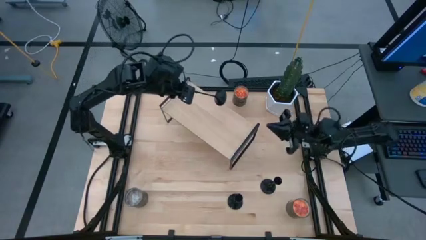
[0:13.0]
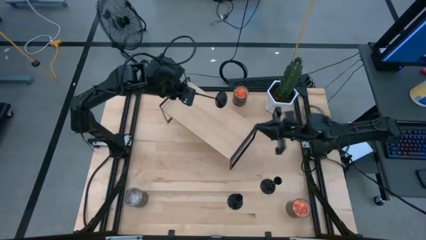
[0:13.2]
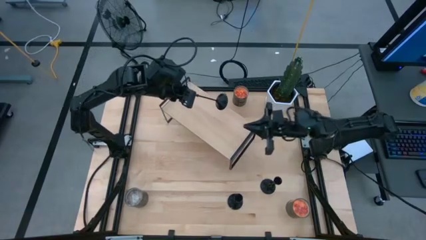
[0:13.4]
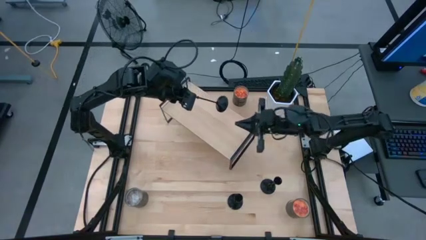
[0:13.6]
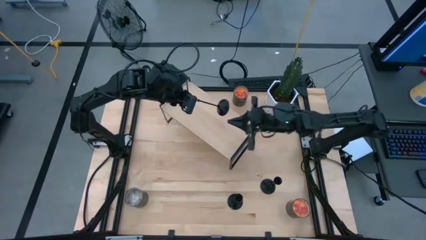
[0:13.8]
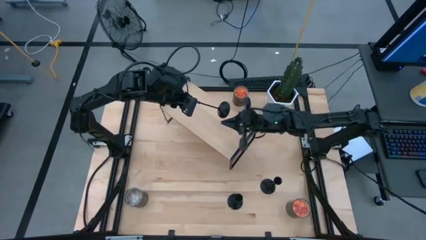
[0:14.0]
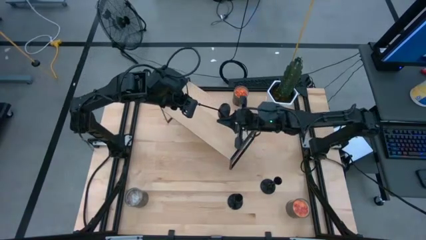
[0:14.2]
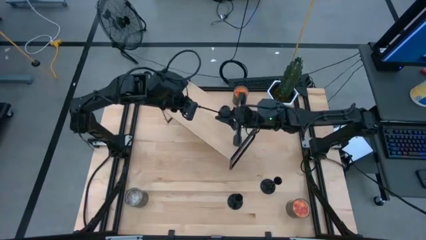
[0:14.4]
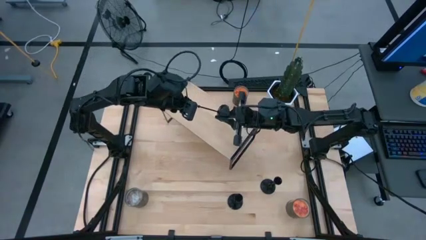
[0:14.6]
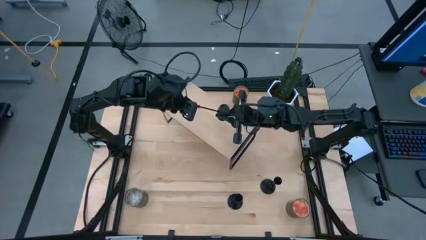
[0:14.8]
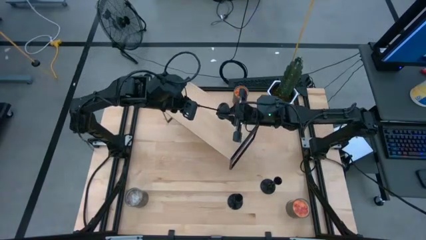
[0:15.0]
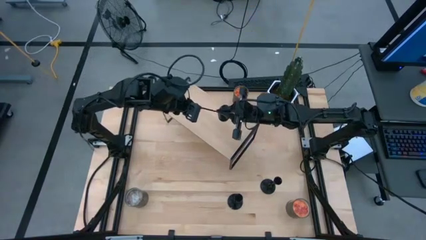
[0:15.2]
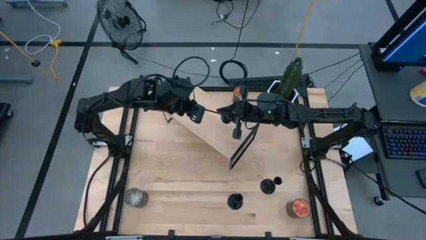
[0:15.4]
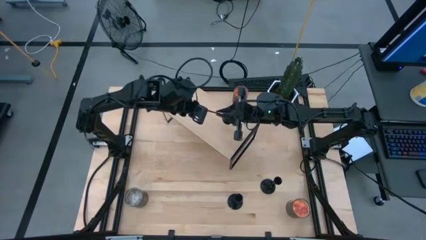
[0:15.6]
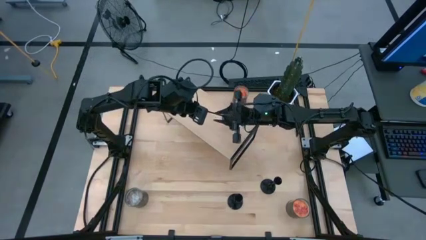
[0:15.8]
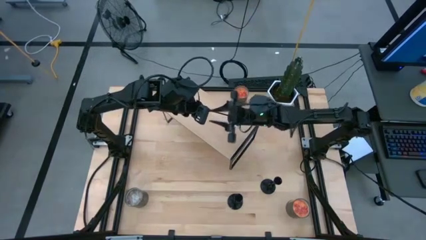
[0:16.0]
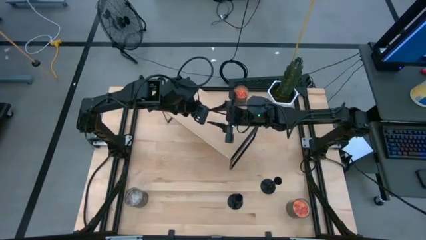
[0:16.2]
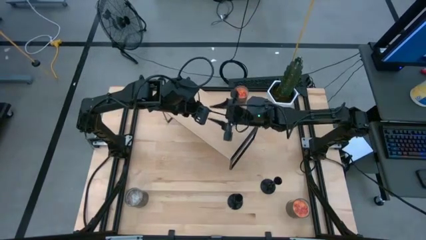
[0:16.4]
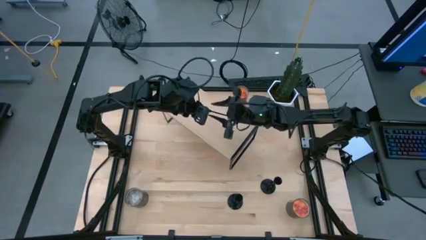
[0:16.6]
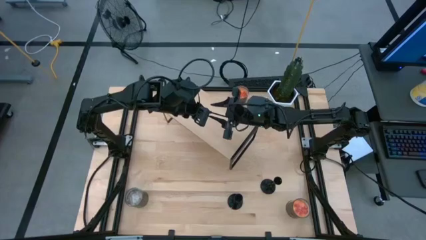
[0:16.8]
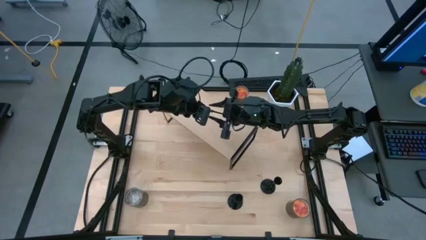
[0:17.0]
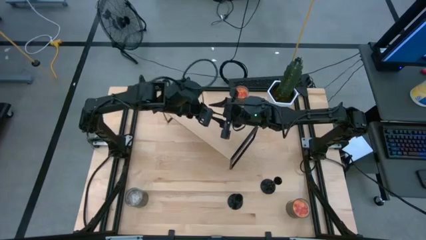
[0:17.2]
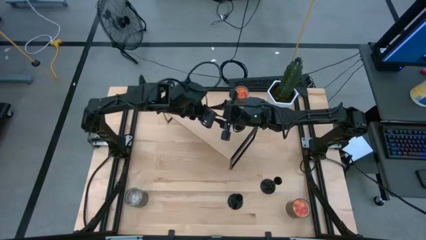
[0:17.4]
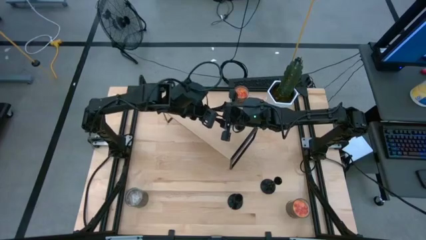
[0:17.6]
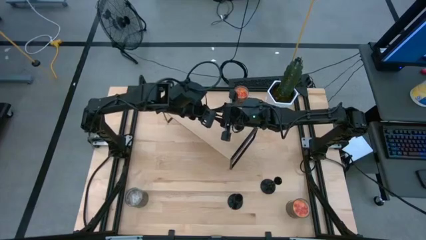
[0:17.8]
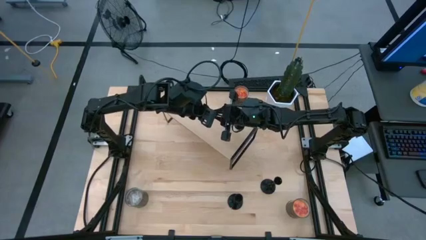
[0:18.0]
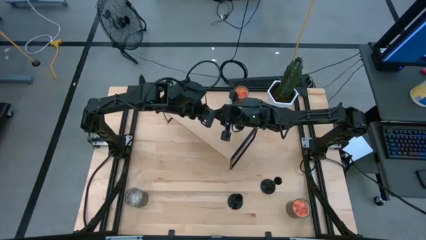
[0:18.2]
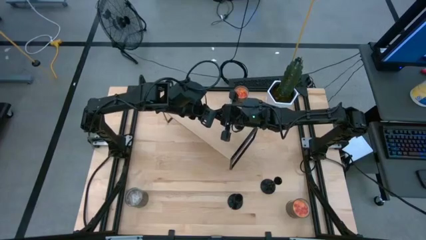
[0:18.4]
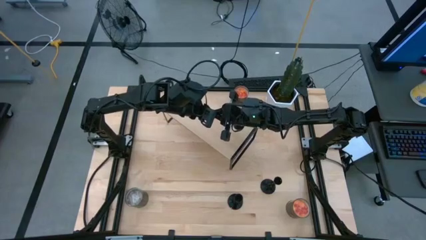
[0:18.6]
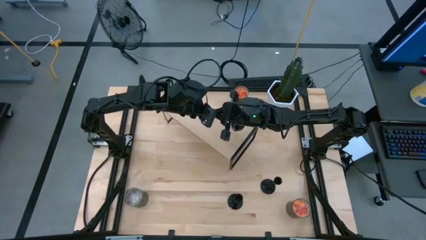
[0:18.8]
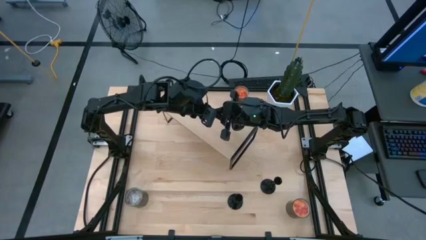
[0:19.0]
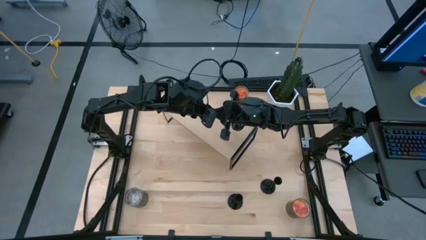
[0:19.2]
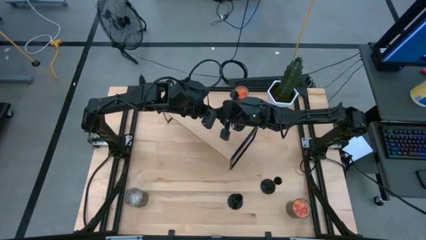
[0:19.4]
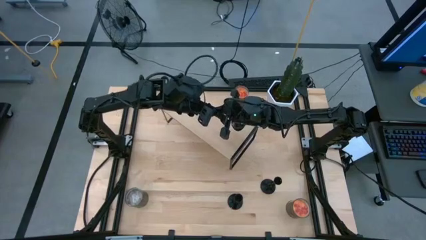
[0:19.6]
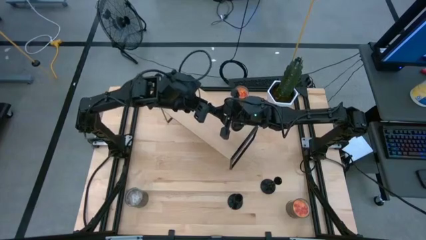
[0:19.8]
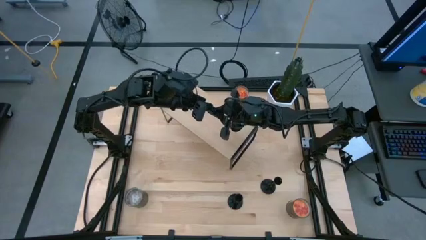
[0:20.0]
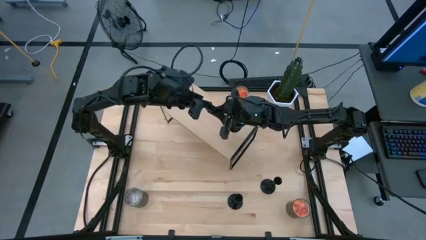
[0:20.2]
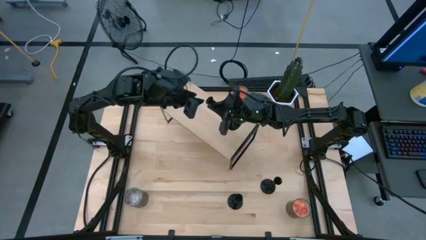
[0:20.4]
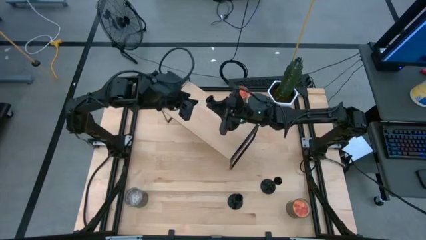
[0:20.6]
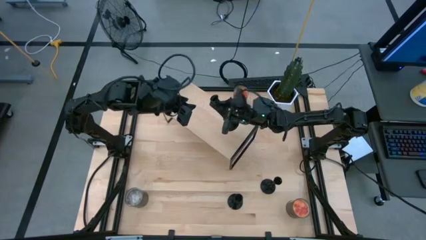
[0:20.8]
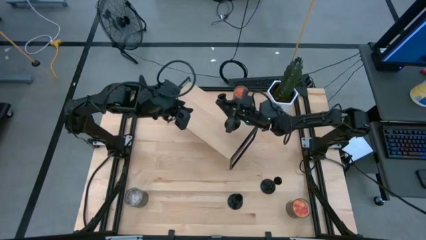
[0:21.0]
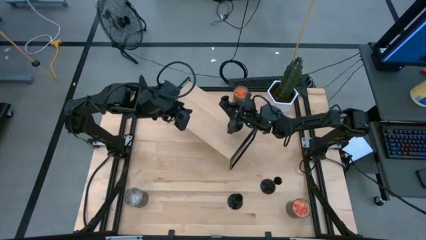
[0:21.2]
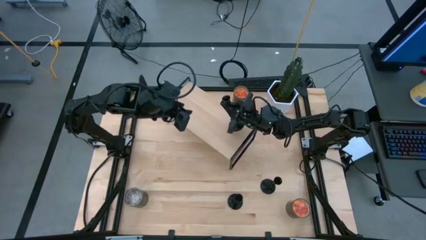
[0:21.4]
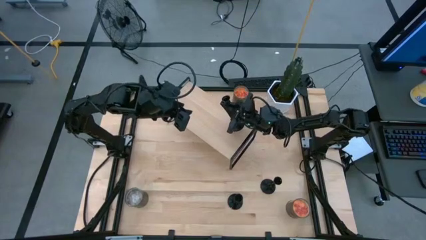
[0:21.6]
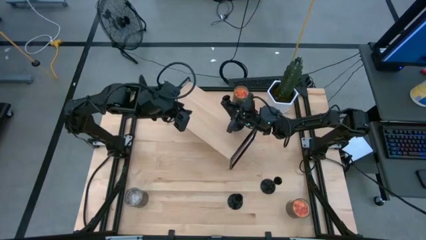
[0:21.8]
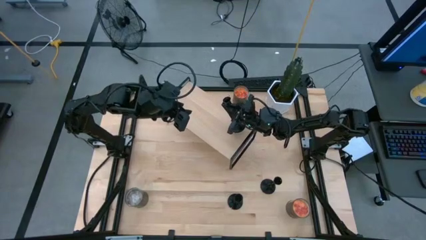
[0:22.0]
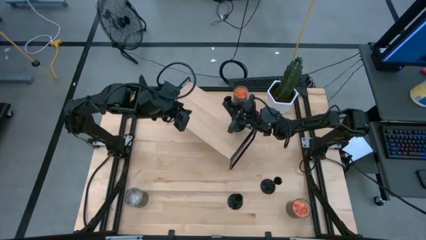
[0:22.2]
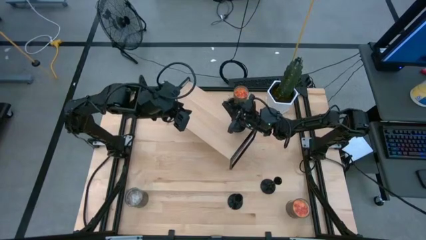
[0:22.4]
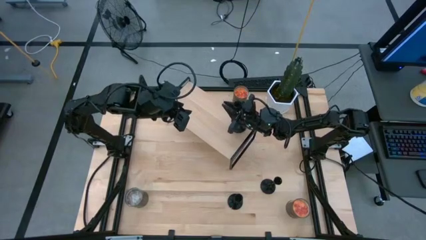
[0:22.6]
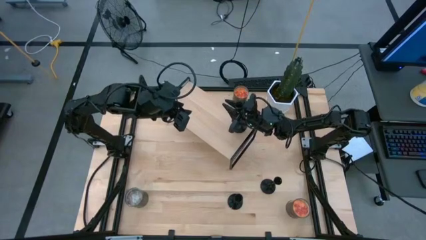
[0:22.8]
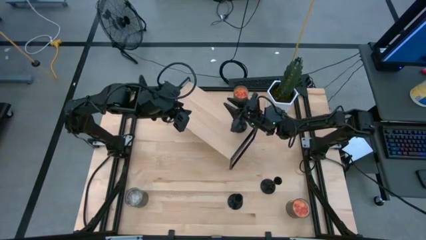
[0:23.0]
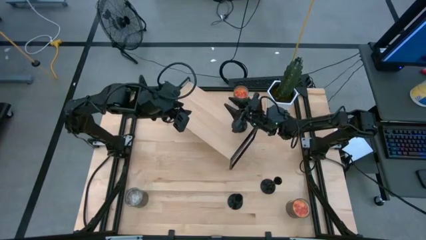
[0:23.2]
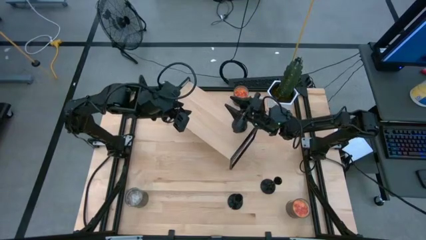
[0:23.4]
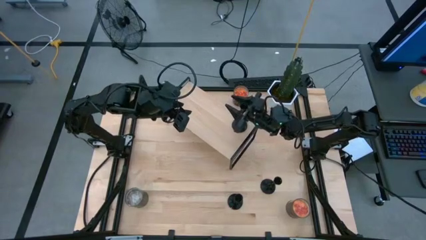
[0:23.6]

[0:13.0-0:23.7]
Task: Pick & Place candle stick holders
Put the top black candle holder on the shelf

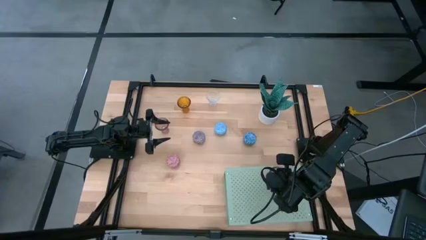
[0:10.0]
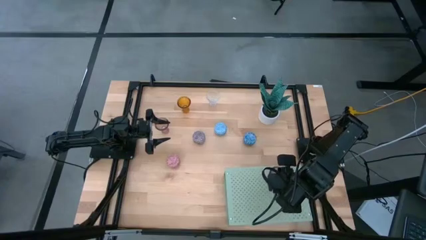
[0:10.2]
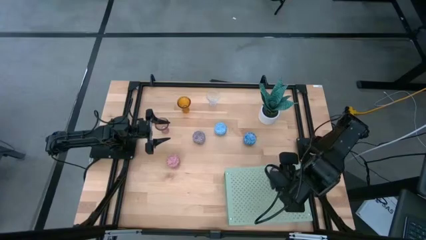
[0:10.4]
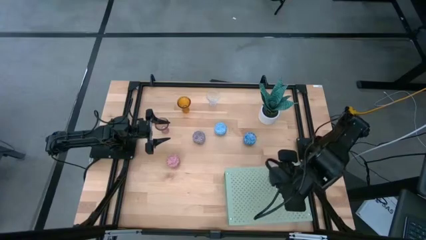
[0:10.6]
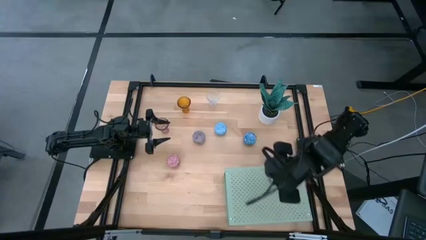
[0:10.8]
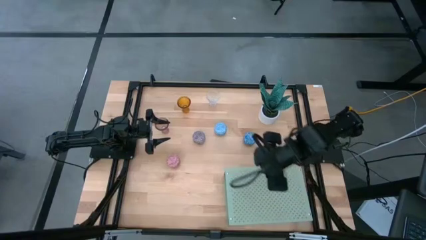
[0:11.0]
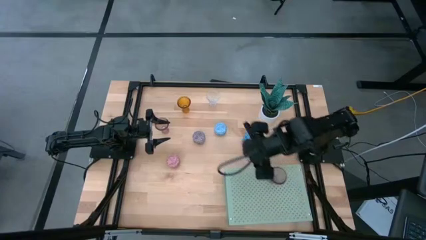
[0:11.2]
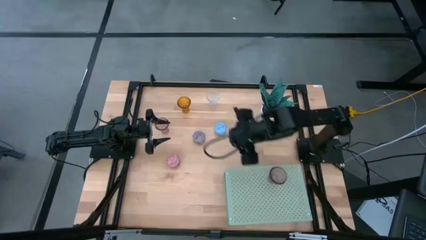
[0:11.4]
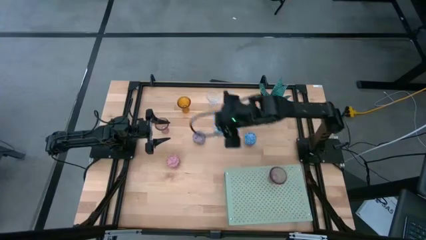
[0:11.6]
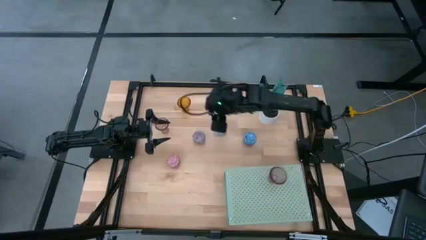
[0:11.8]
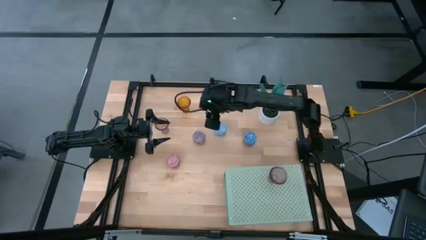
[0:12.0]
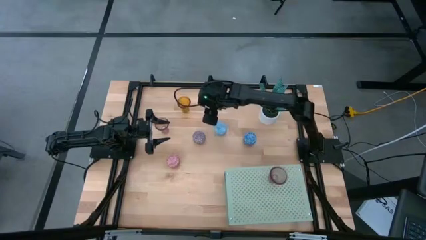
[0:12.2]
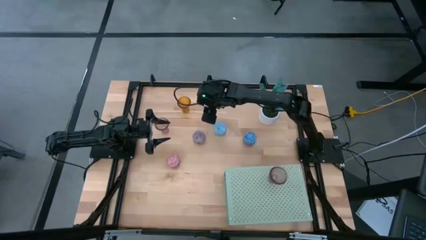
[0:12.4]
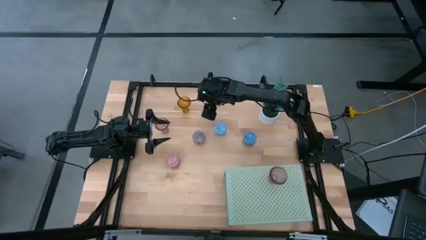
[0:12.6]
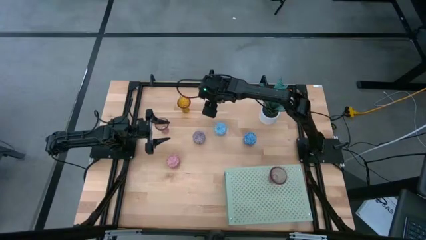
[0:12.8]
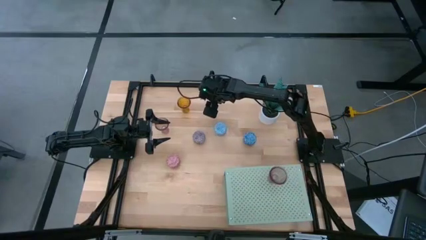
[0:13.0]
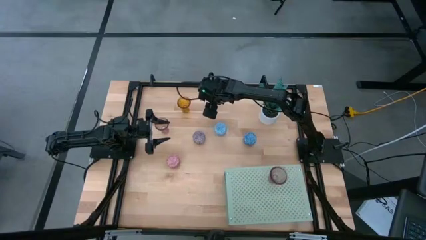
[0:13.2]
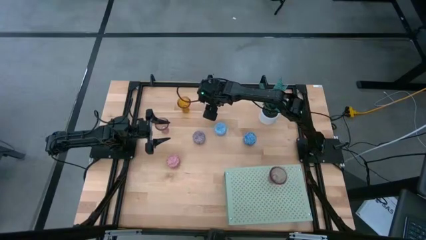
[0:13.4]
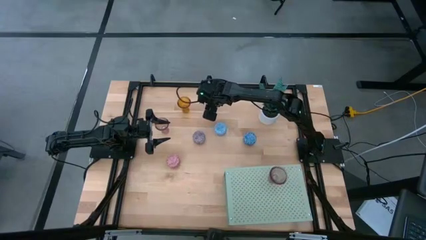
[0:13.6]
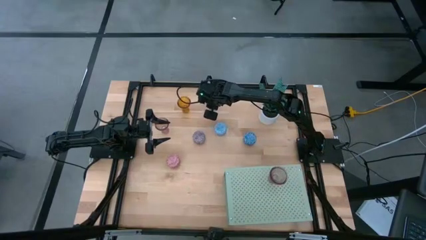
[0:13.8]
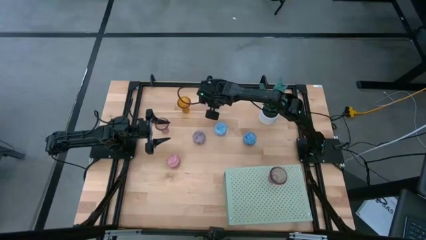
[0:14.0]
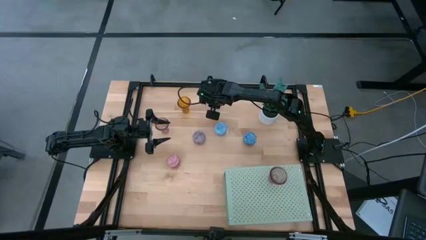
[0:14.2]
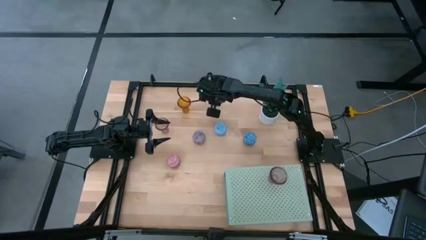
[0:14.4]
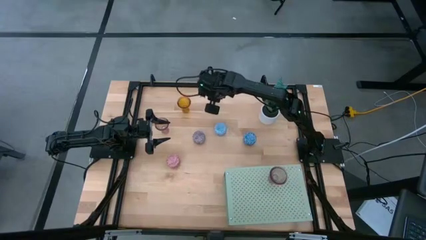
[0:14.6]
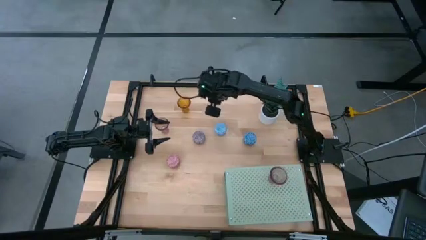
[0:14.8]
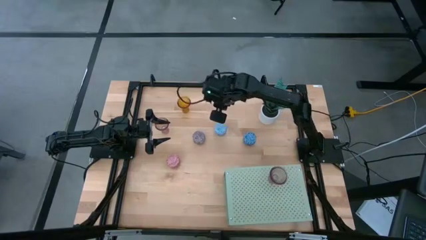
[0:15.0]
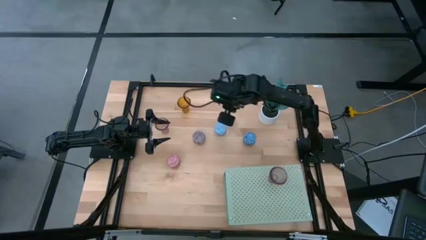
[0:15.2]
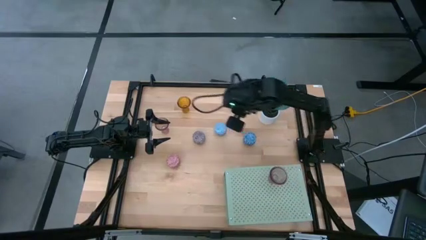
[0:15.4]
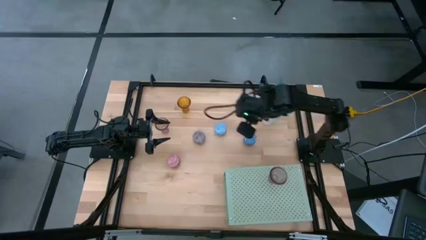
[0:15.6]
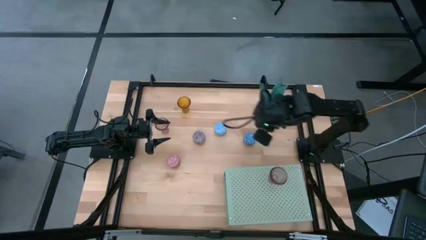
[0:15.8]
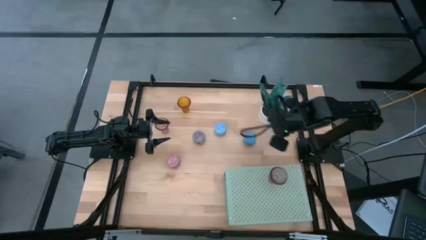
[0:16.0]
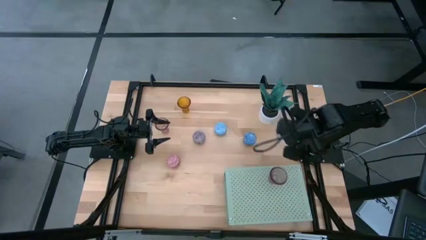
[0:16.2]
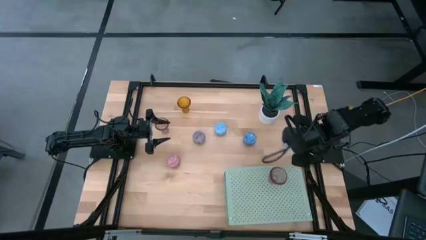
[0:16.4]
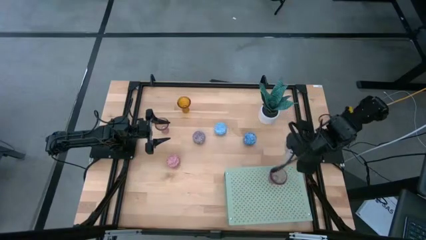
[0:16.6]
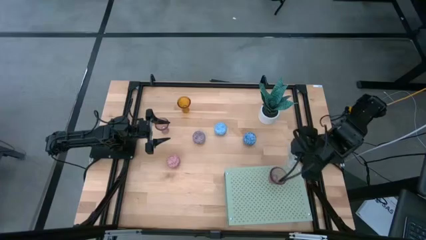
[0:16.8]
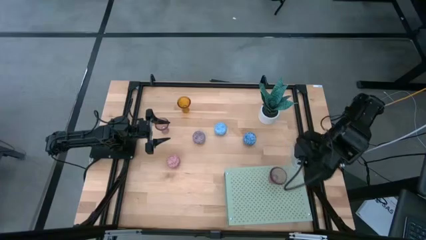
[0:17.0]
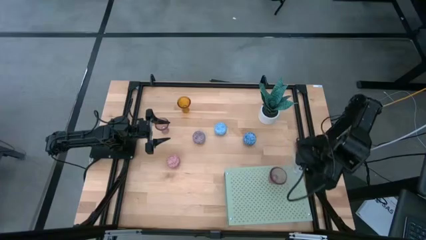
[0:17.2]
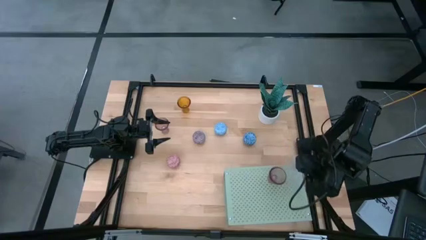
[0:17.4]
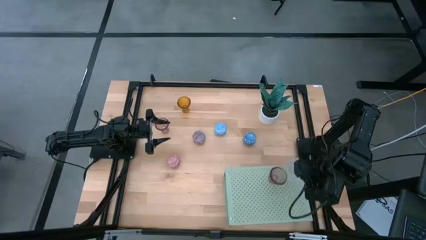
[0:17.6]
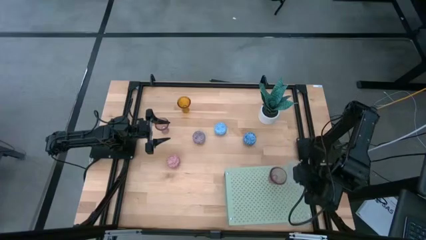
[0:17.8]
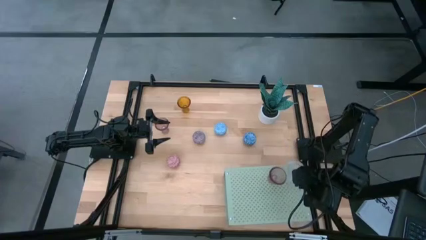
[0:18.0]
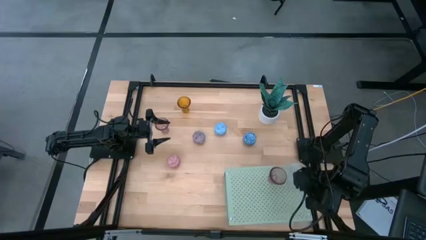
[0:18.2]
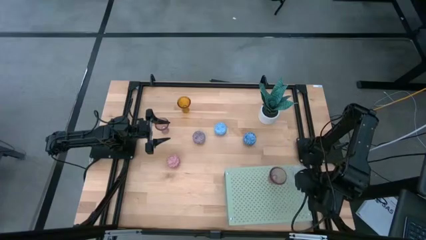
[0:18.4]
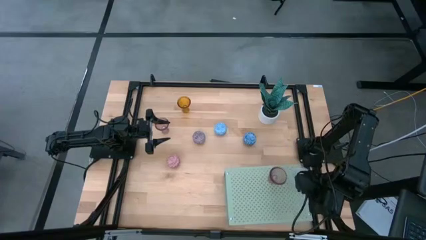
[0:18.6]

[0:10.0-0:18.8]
Task: Pick & Place candle stick holders
Put the transparent glass candle holder on the shelf
